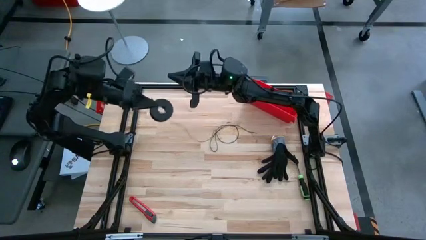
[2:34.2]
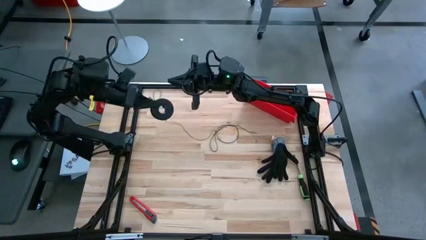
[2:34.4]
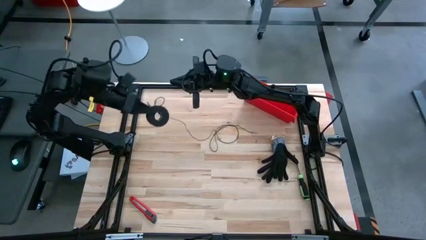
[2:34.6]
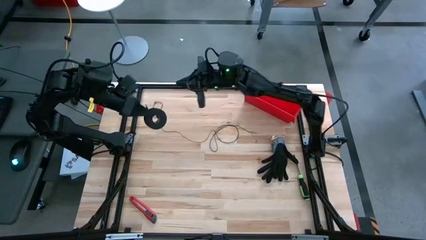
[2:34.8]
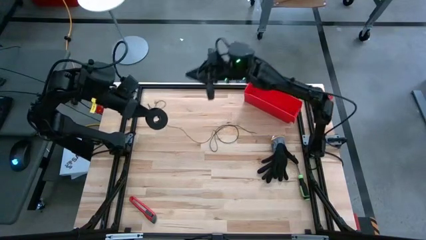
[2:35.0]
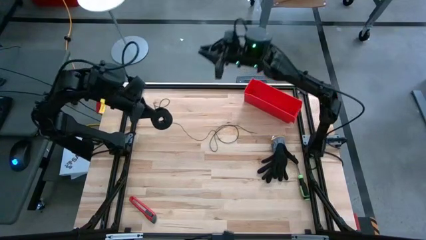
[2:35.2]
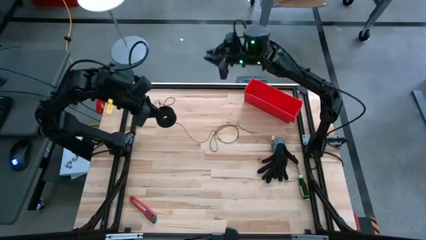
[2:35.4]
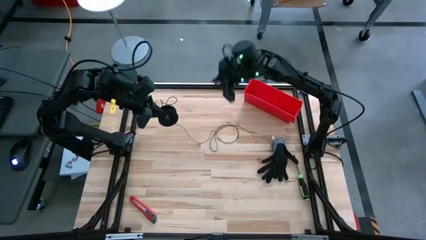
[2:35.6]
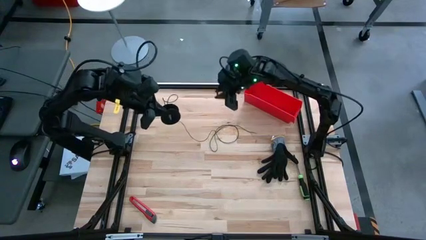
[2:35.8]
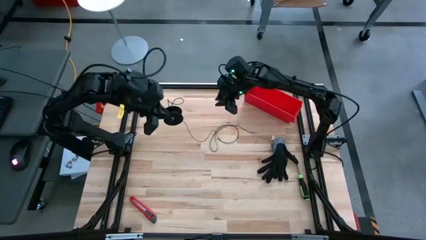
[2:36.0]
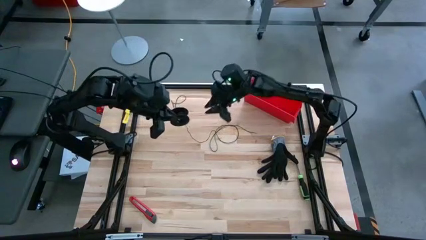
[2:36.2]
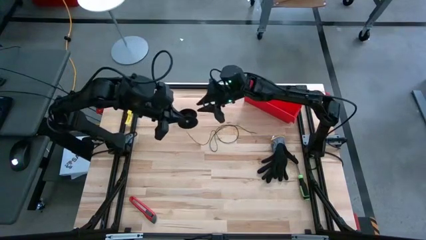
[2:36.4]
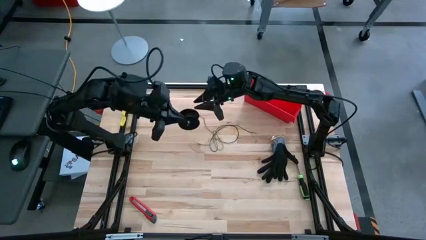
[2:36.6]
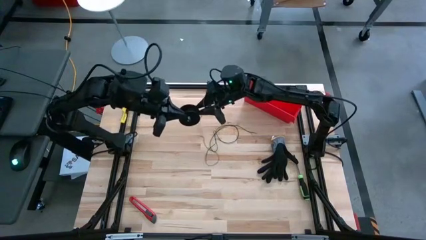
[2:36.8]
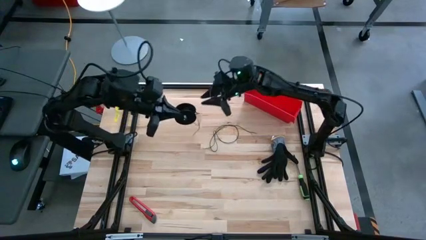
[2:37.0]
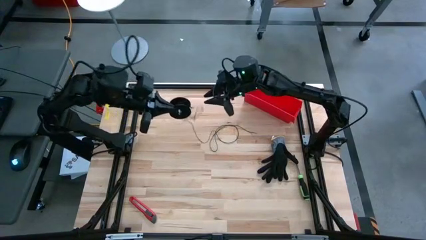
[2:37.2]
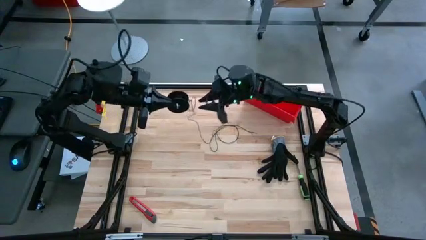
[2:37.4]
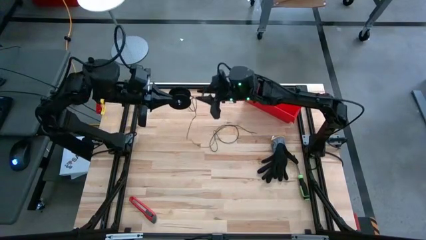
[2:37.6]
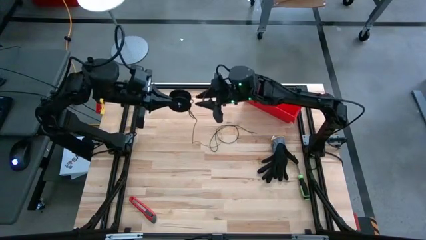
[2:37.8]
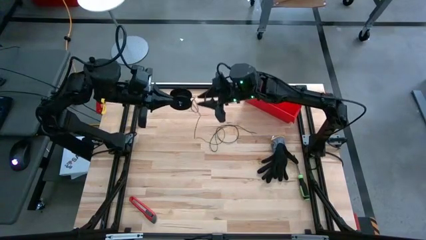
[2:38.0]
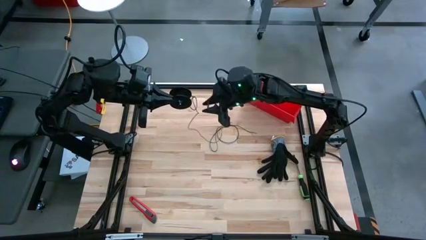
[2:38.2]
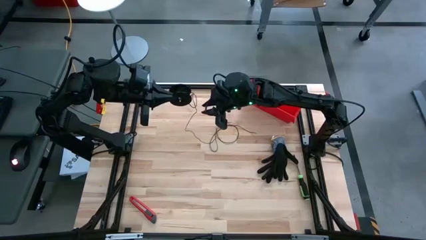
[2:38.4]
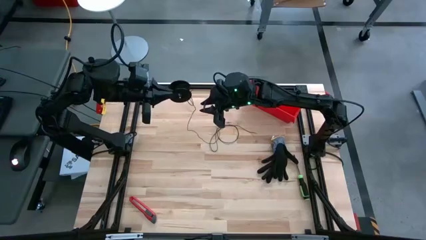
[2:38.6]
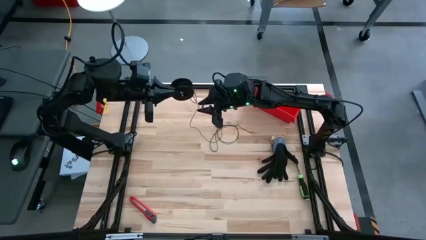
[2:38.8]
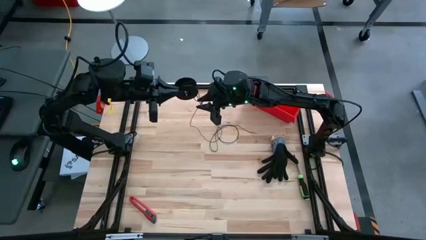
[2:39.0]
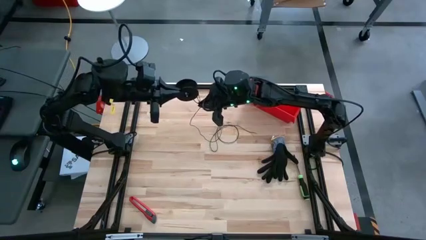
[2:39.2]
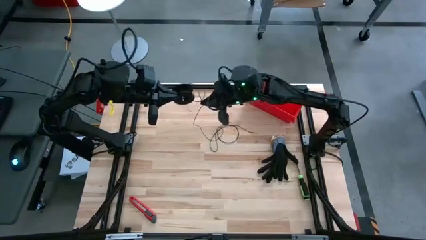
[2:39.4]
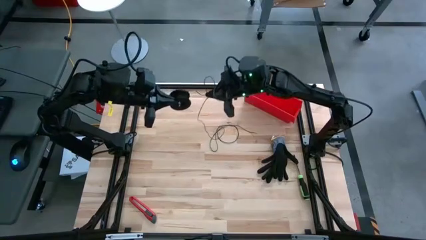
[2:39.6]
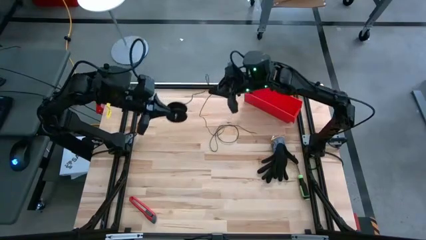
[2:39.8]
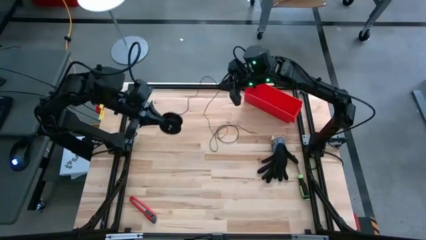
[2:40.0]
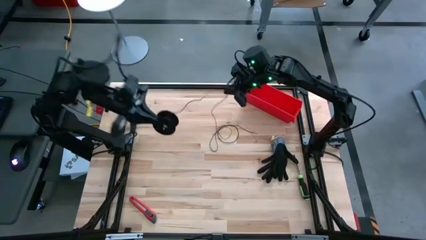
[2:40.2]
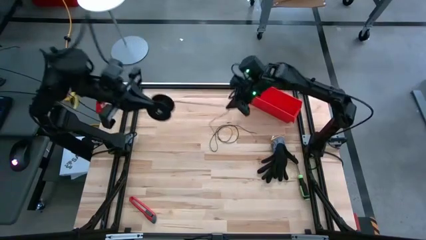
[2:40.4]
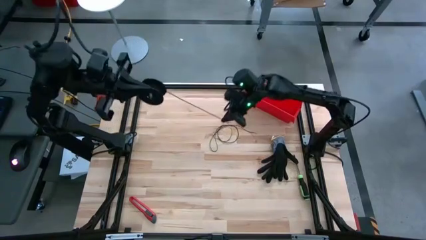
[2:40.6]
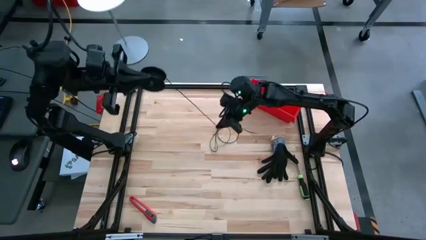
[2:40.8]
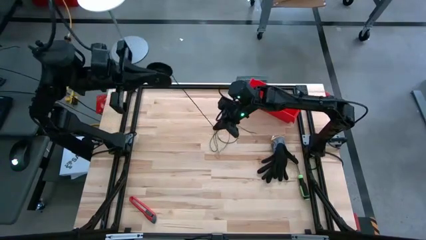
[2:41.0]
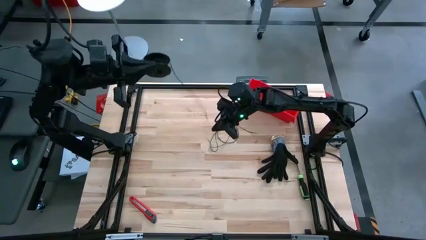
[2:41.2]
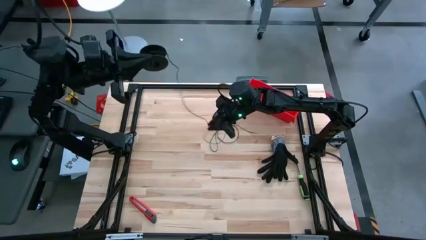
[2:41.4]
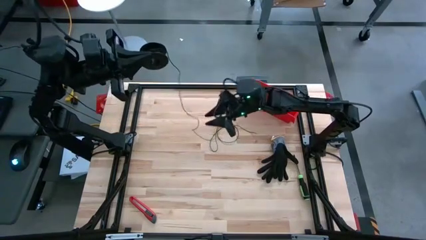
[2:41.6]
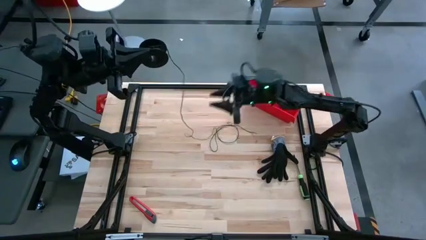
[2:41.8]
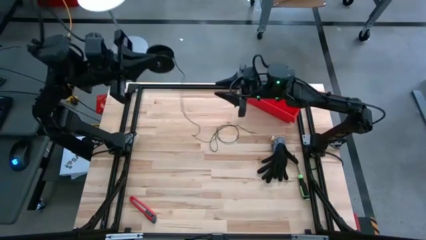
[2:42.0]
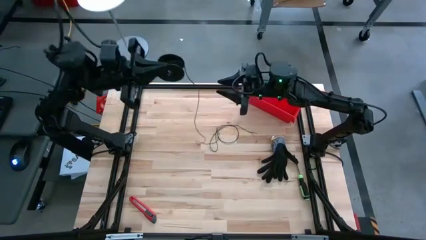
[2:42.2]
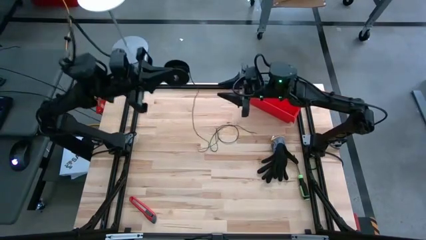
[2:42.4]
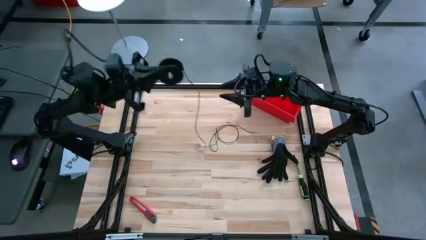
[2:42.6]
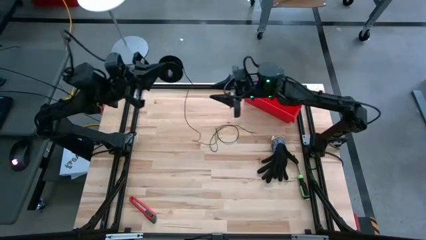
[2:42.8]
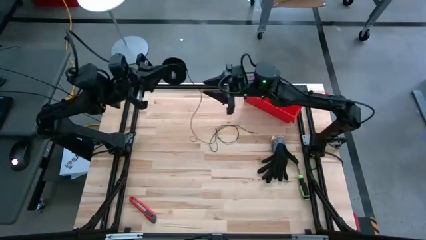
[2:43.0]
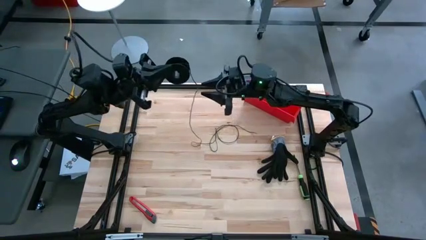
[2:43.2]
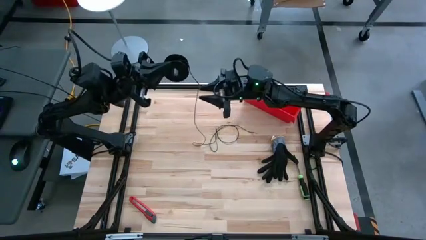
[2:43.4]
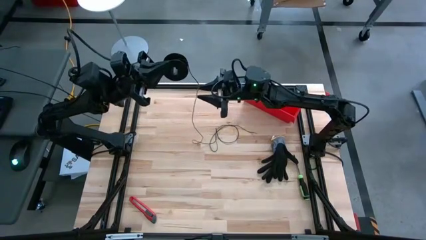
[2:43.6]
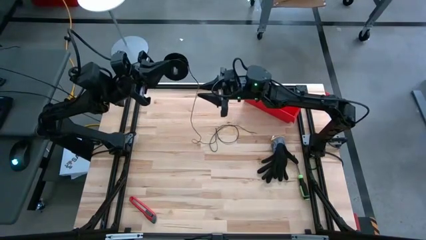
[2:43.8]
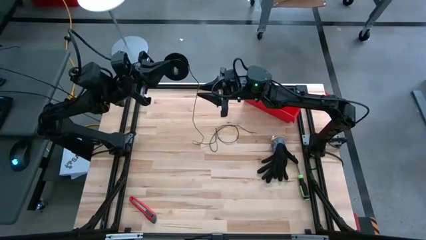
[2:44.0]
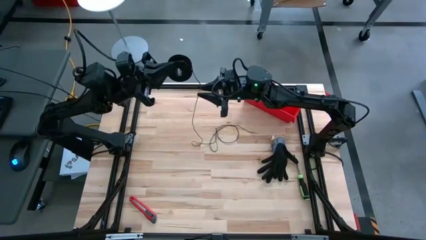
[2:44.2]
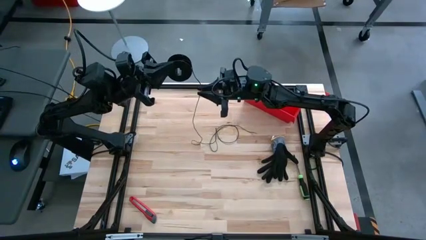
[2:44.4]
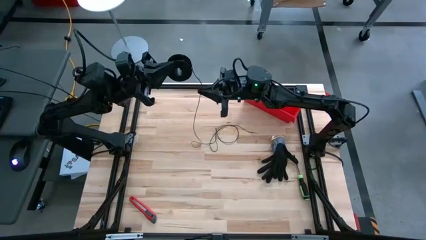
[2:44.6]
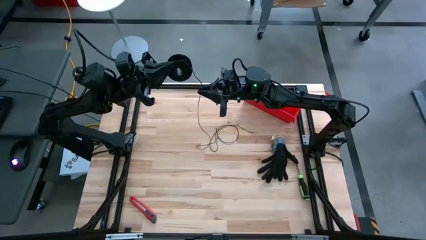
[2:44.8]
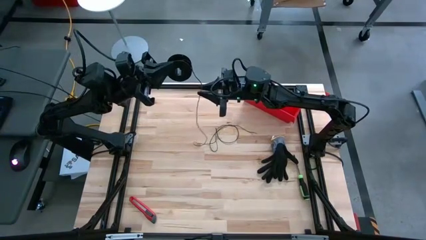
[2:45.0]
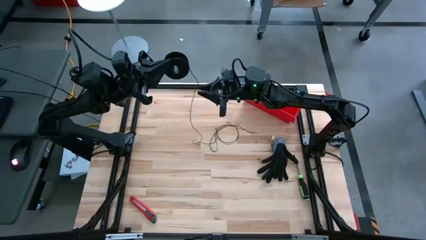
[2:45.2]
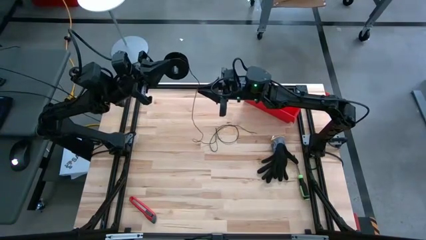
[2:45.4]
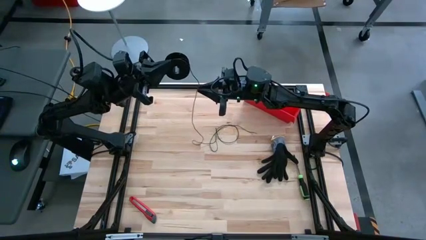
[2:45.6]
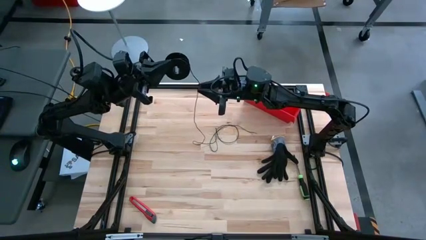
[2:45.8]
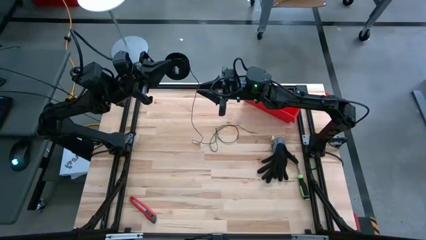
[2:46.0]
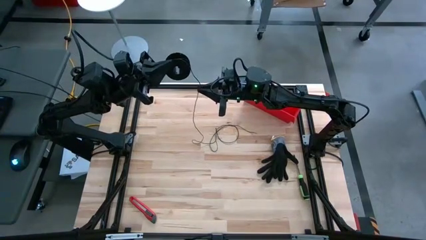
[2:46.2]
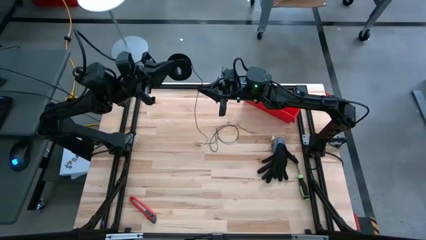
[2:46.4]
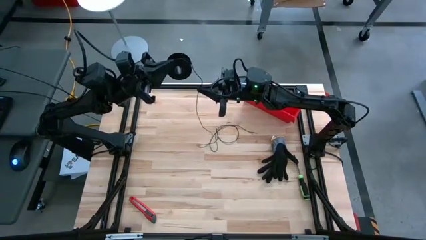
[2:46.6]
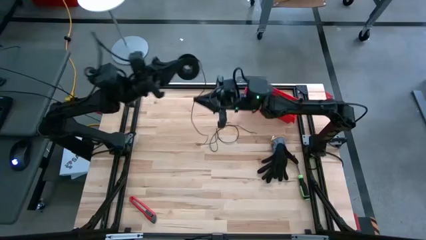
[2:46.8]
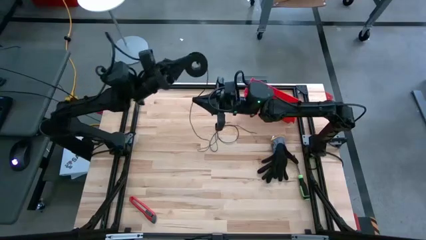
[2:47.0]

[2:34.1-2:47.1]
Task: Coil cords
Coil the black wire on the spool

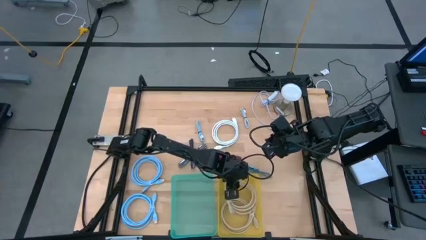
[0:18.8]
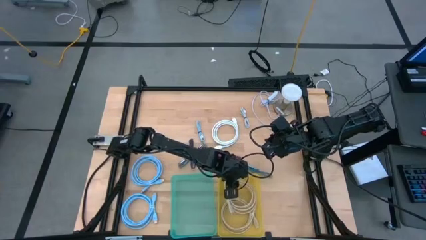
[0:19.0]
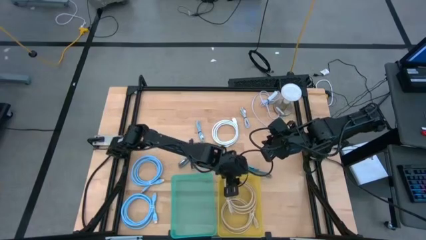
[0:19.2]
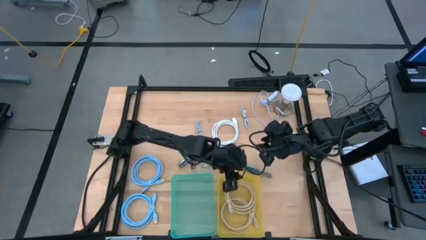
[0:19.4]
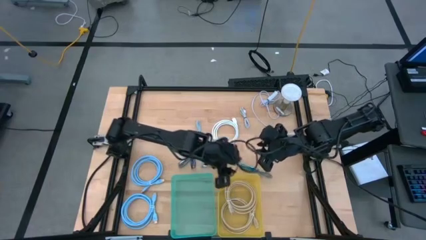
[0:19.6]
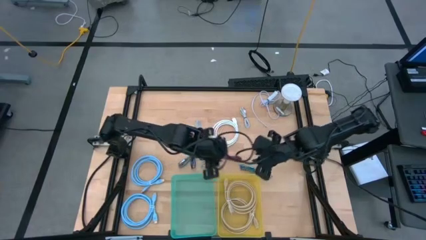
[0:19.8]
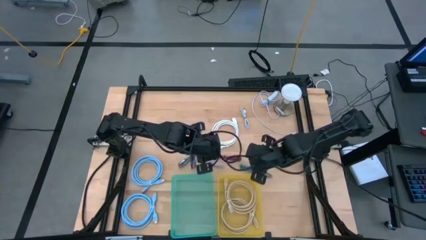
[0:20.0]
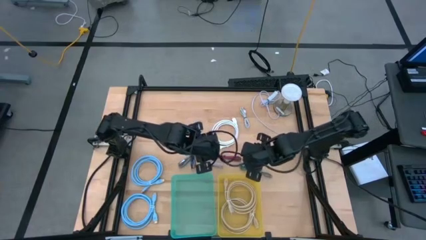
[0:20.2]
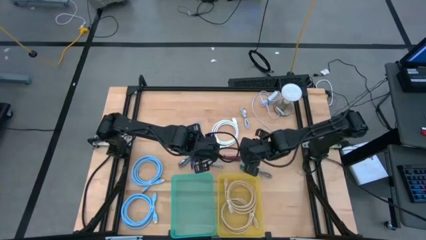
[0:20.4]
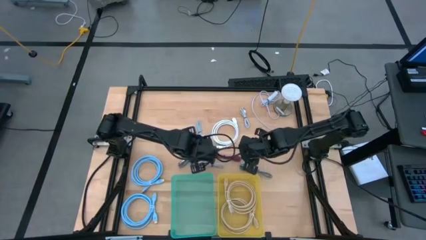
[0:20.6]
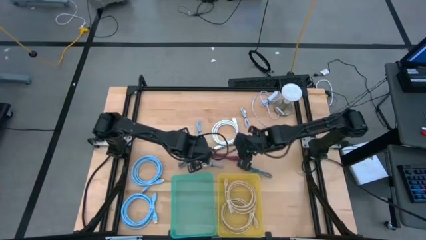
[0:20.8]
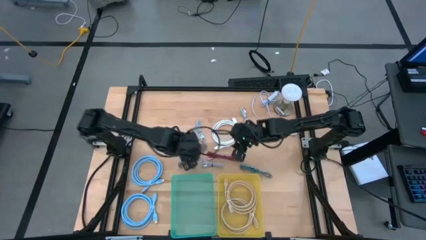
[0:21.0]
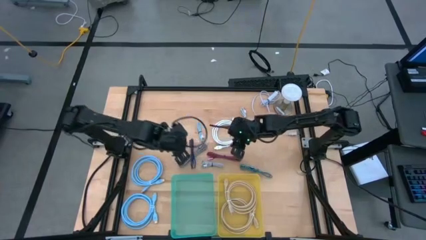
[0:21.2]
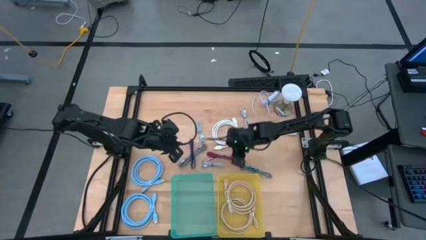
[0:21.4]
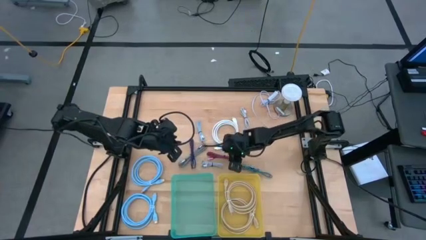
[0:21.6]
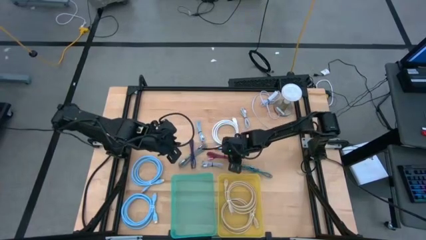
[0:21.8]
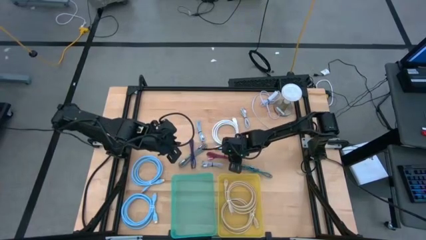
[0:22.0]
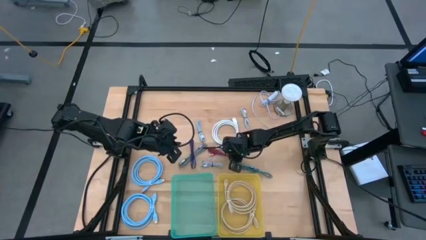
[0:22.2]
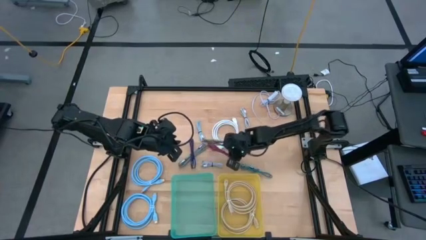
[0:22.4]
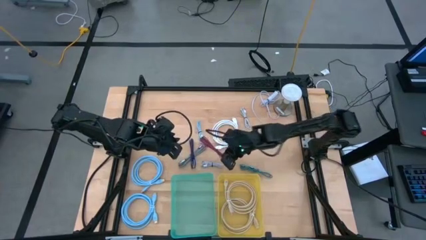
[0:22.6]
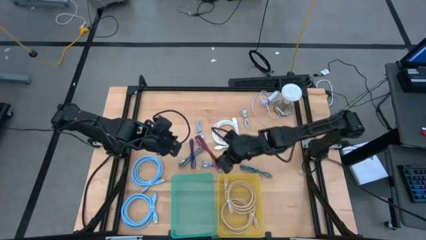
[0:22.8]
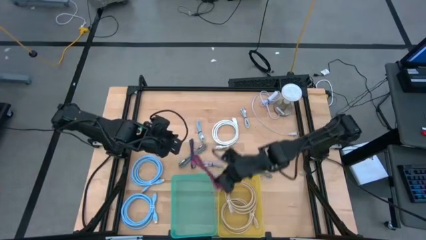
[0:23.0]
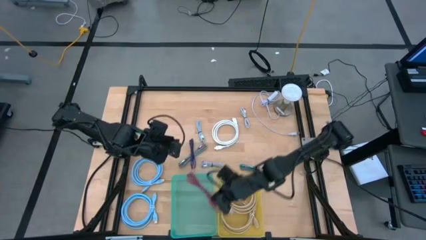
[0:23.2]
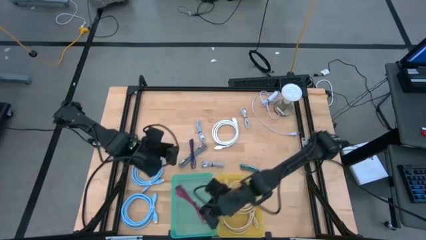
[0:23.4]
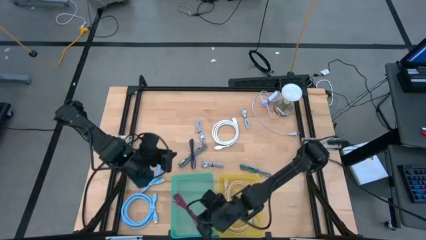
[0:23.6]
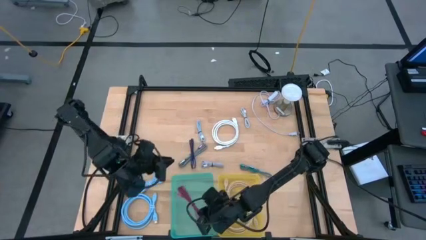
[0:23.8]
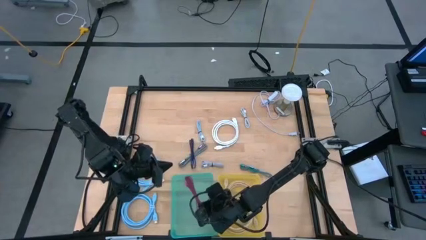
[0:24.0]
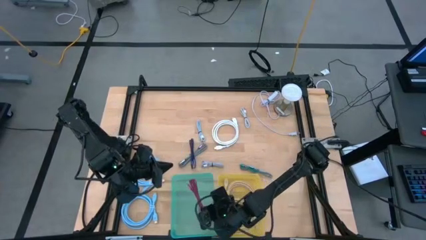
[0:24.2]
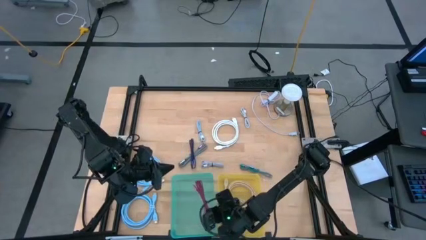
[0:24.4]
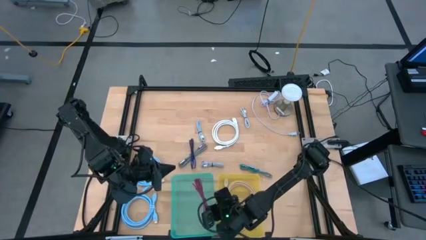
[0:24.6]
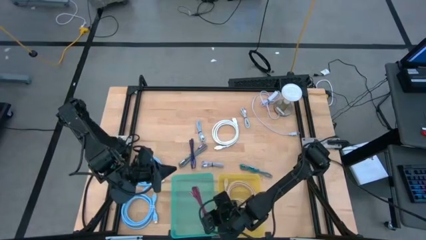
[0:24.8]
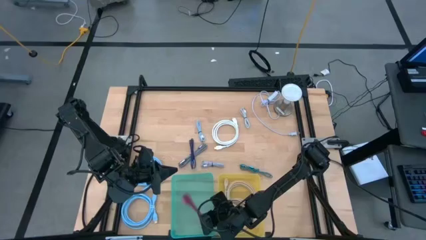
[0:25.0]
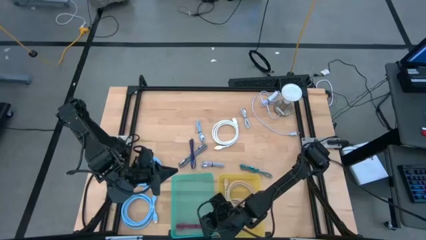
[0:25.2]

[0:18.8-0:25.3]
Task: Pick & Place USB Port
Put the pink USB cable into the green bin
